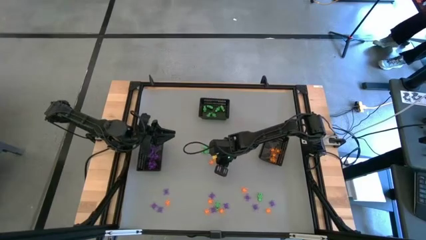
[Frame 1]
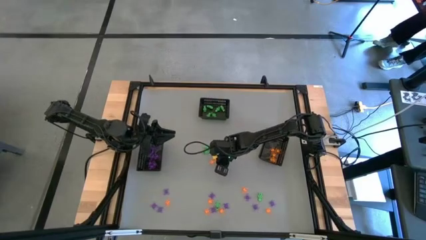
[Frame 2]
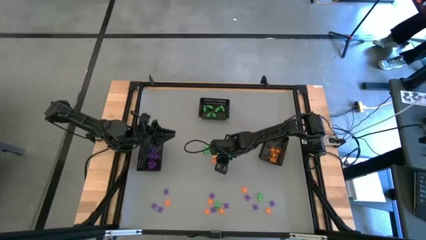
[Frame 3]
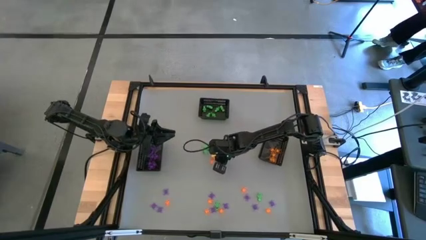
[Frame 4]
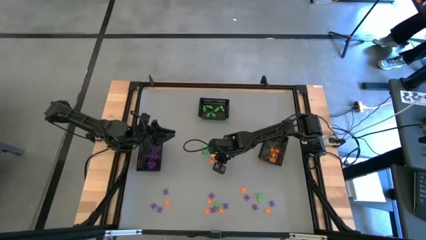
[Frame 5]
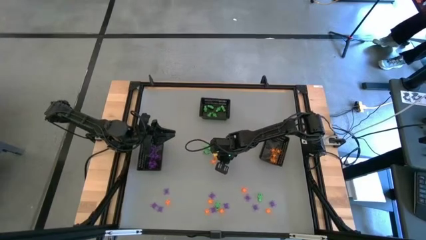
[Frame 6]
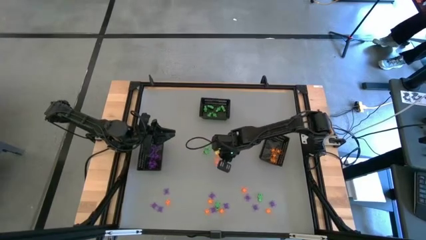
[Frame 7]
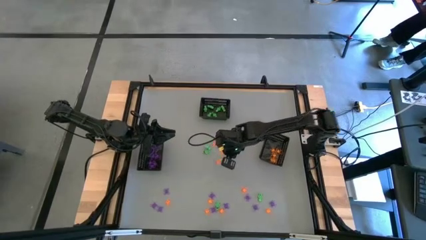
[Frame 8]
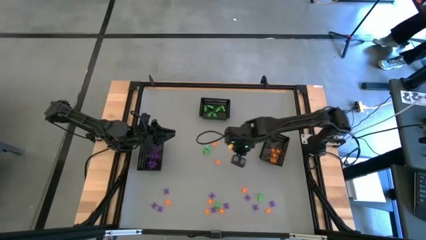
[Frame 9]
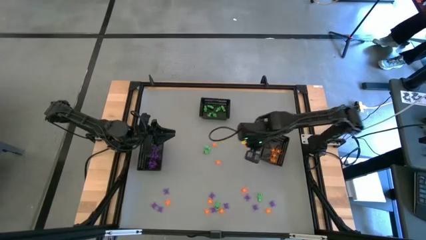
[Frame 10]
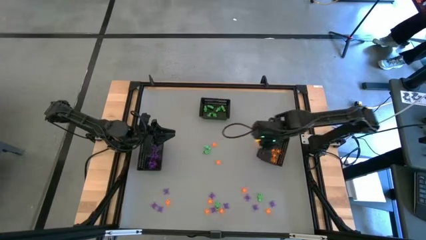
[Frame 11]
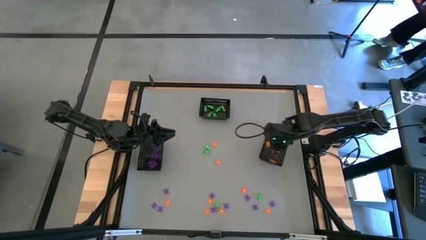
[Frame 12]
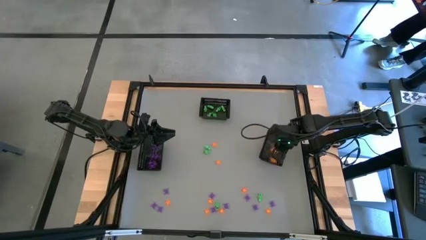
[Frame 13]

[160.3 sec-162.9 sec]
Task: Sort Halloween decoration
Put the orange spider toy into the right bin

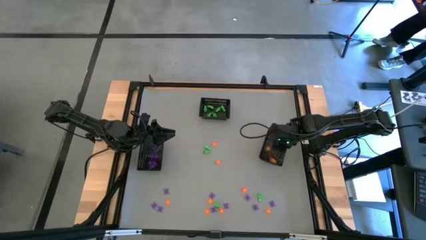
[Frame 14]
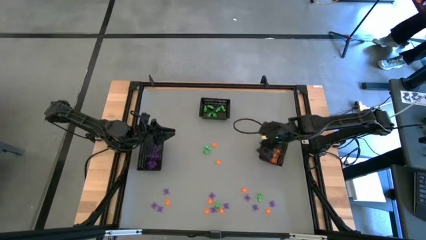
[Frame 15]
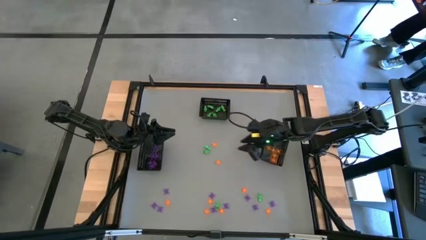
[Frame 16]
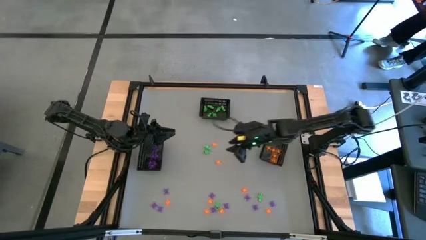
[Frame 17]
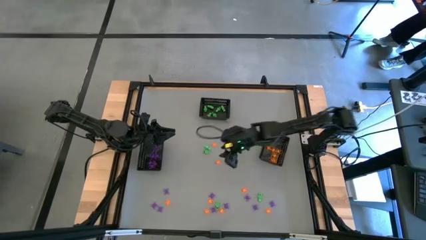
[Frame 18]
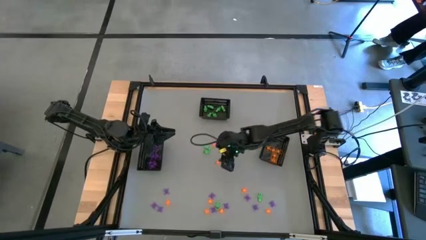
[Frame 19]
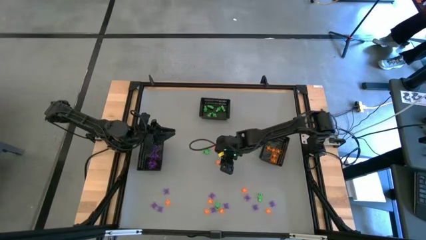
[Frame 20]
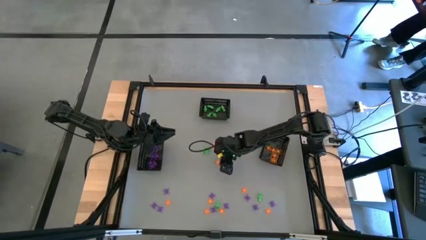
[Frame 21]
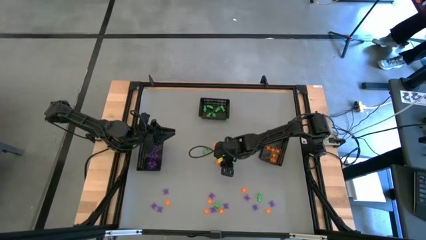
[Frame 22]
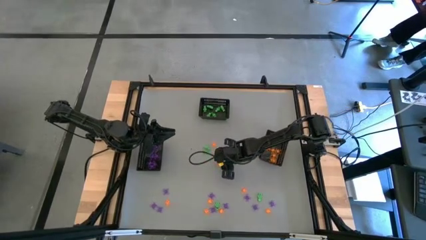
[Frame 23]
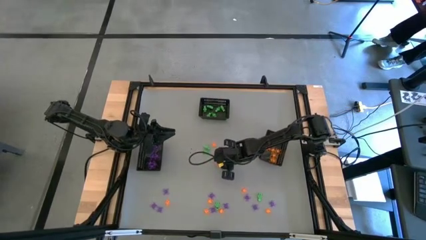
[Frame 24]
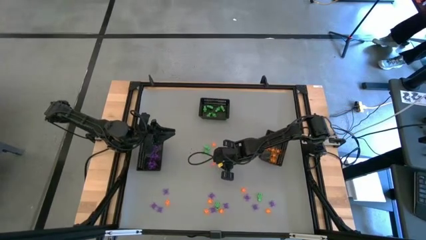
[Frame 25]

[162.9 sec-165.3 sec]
Put the orange spider toy into the right bin

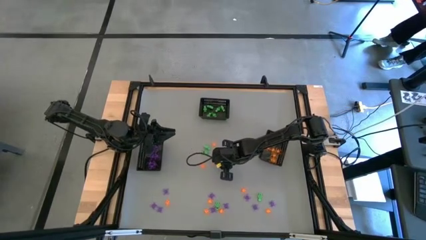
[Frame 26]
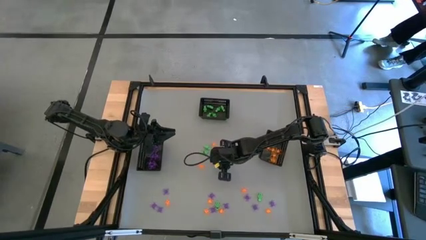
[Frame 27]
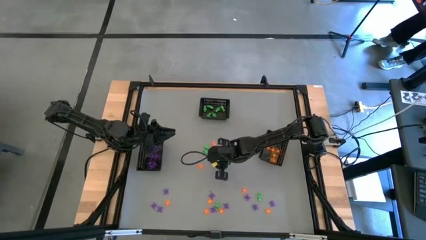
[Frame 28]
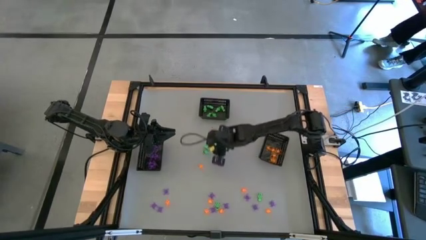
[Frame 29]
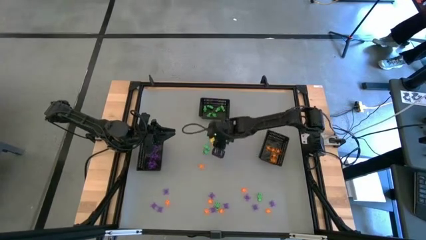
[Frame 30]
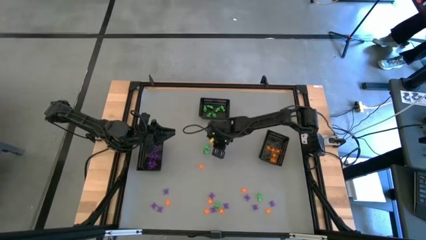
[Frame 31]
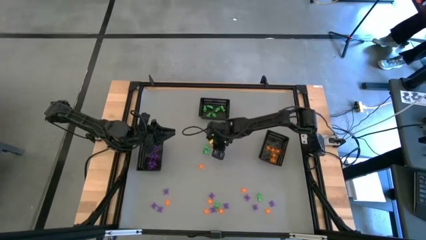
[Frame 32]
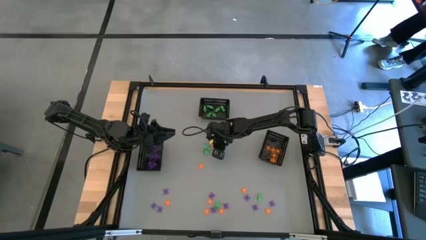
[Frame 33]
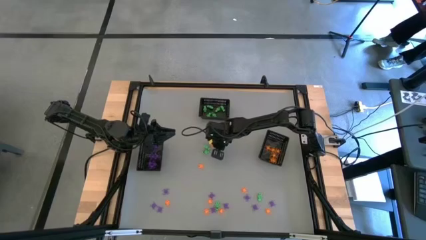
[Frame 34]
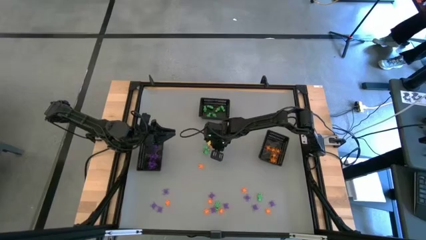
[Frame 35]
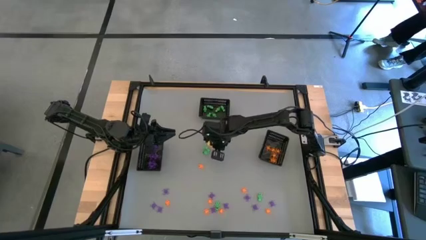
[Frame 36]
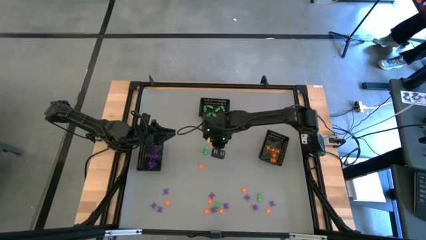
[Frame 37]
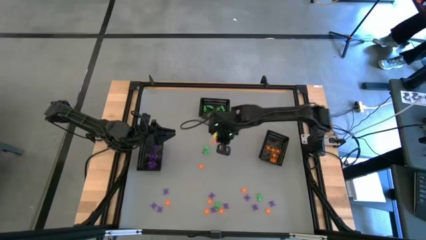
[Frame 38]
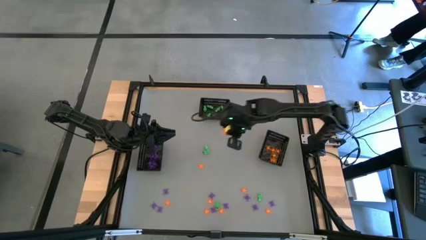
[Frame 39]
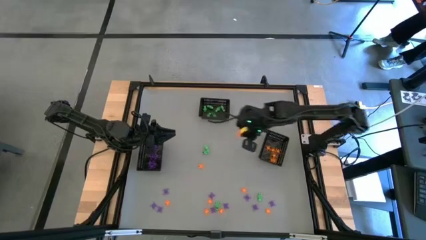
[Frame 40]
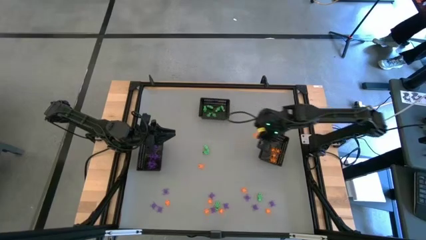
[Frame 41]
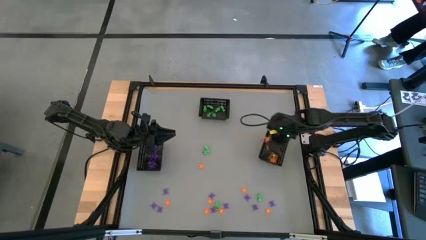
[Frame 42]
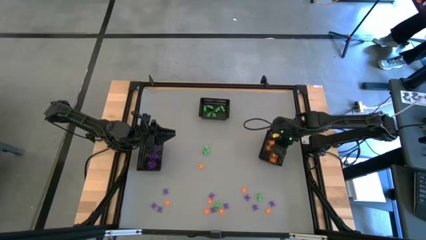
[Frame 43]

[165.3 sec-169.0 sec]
Put the orange spider toy into the right bin

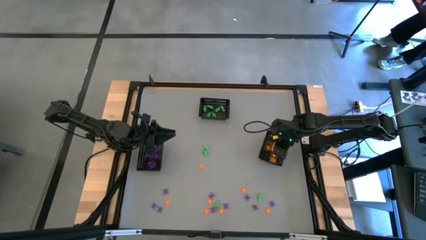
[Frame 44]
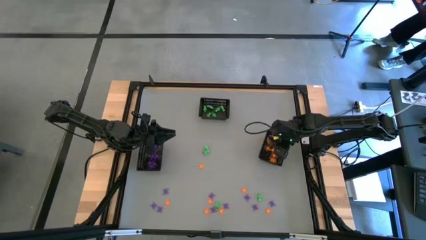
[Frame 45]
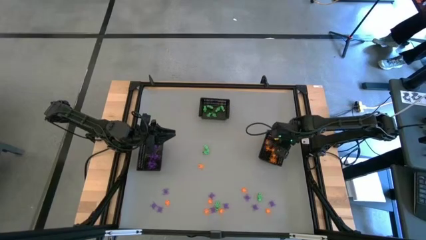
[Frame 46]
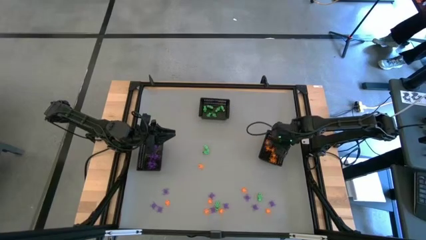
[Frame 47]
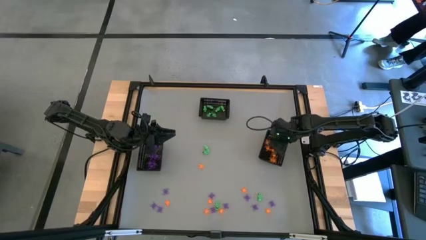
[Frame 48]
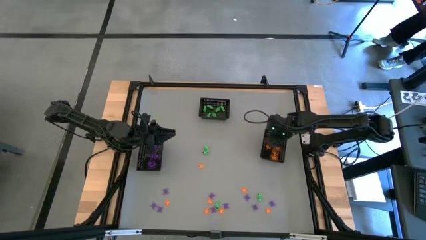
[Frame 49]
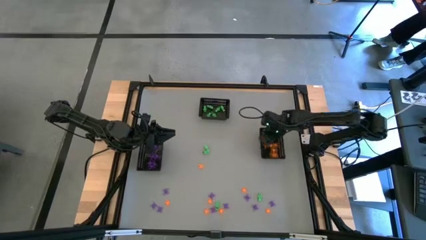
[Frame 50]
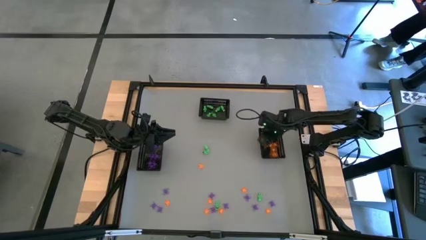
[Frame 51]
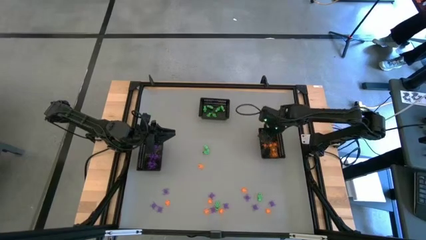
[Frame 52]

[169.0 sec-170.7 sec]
Adjust the right bin

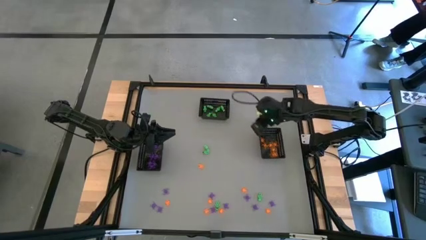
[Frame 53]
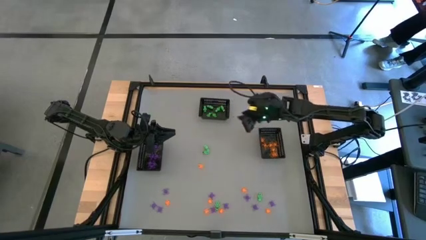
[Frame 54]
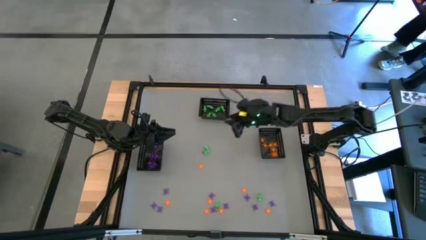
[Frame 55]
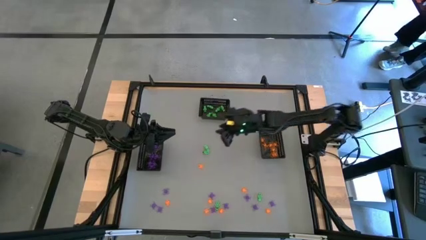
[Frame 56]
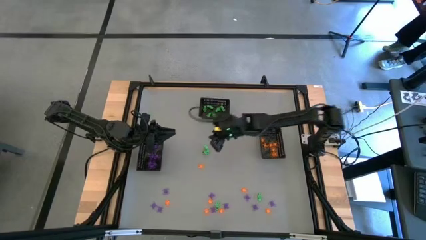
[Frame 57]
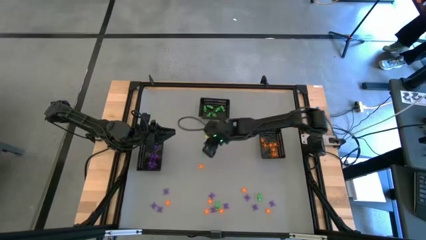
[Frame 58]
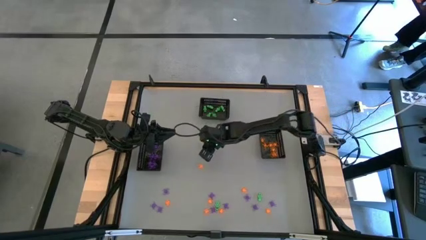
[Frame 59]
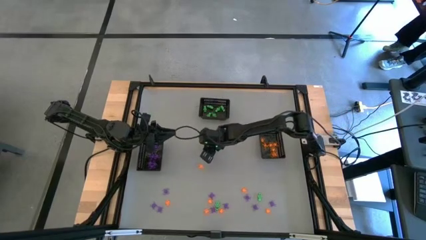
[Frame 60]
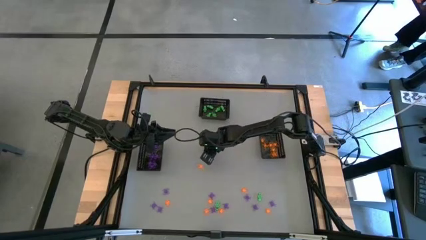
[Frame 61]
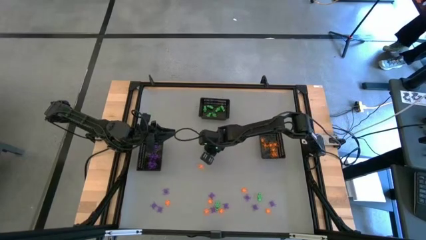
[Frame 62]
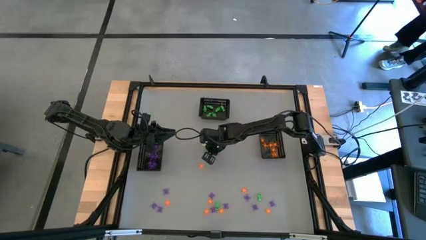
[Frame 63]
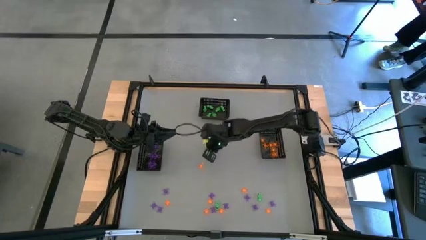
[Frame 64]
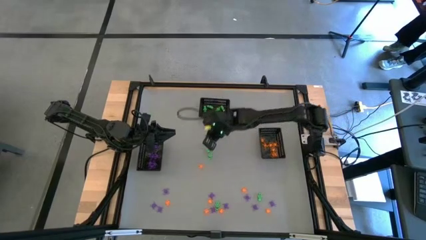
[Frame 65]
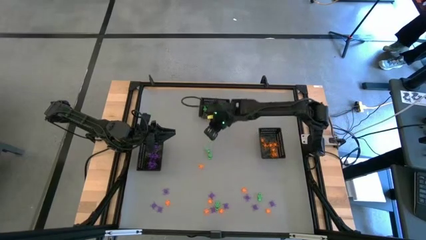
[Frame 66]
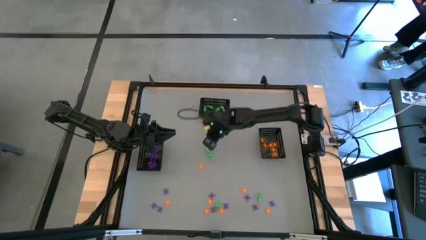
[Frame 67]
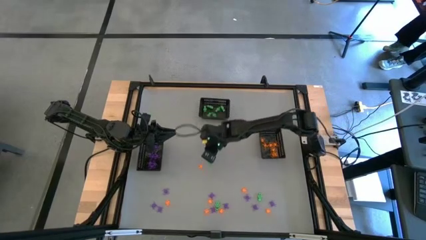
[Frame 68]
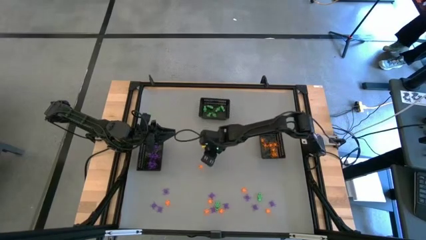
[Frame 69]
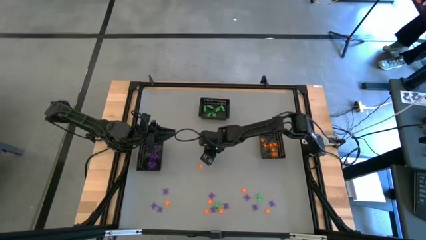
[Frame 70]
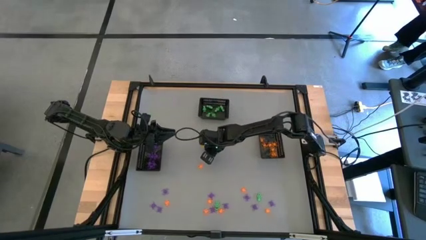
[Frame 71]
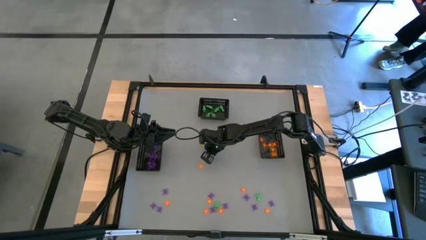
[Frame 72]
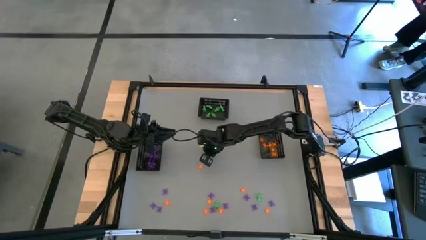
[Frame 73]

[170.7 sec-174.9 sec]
Put the green skeleton toy into the top bin

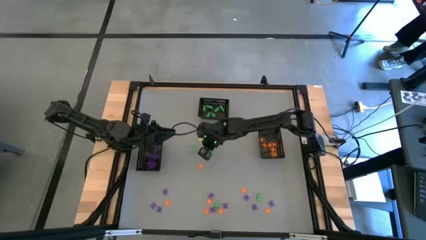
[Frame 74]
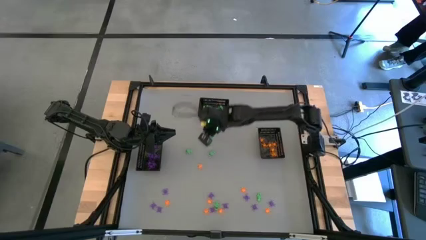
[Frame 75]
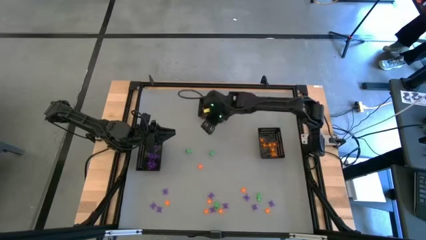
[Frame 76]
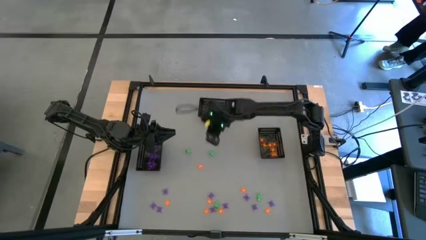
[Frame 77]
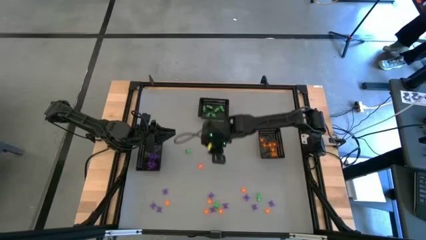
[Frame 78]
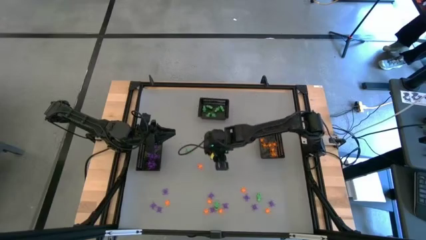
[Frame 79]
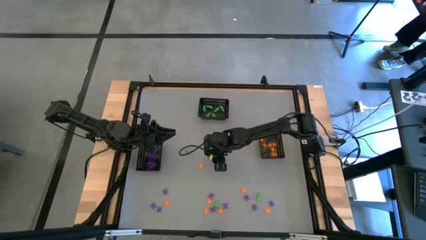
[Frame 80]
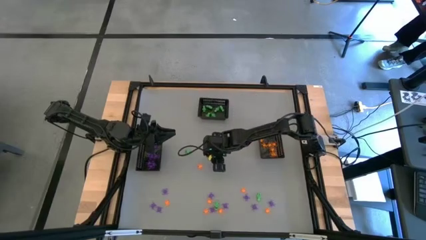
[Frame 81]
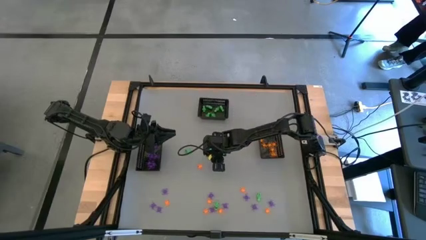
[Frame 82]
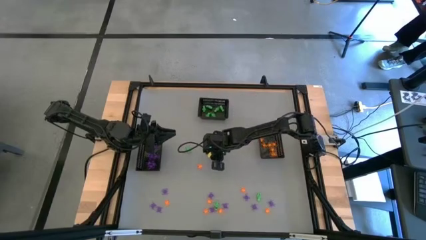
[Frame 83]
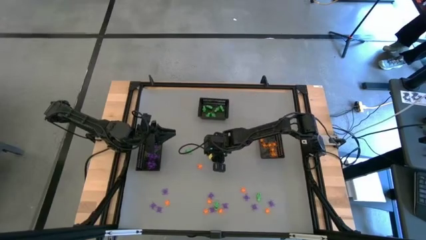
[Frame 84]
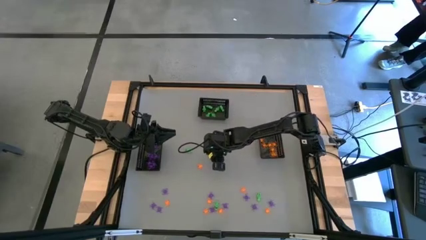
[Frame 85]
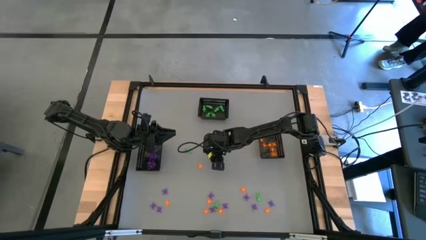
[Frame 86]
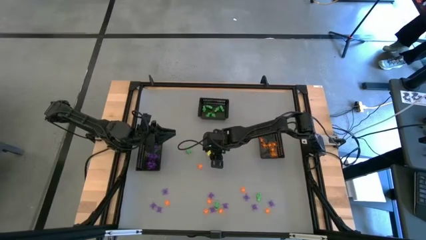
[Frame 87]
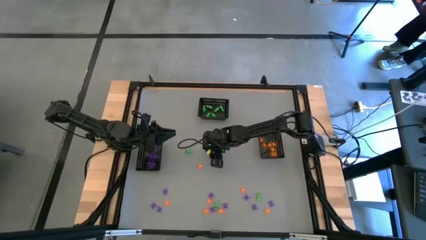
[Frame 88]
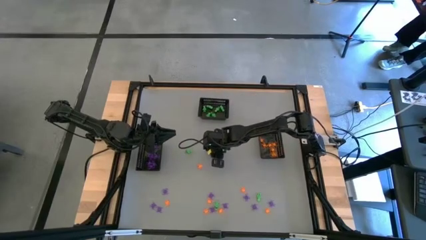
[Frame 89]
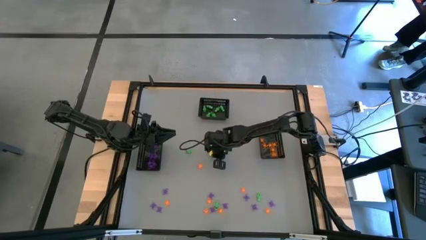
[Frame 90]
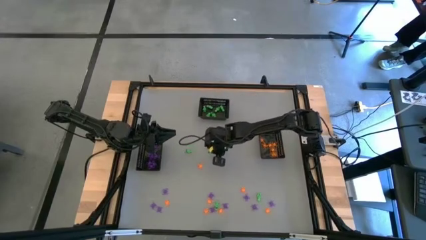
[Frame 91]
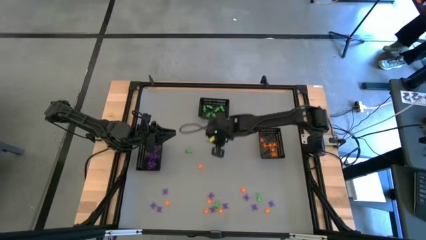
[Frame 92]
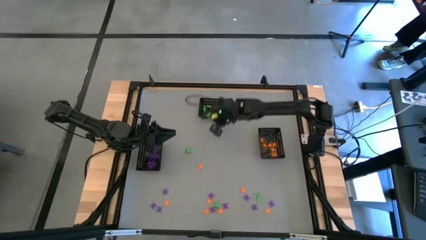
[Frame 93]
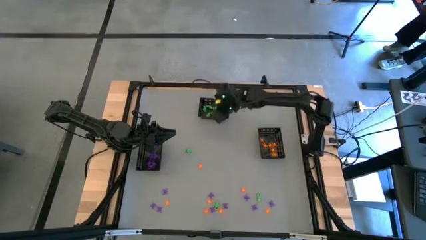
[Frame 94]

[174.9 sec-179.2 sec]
Put the green skeleton toy into the top bin
